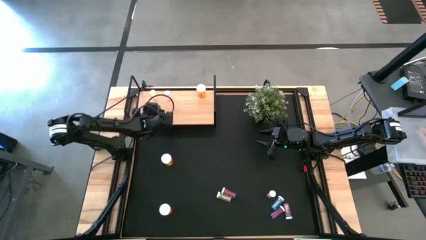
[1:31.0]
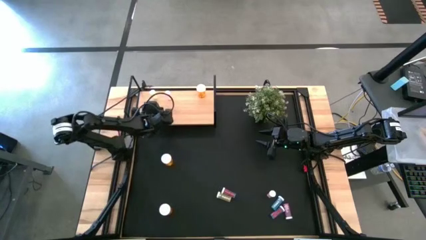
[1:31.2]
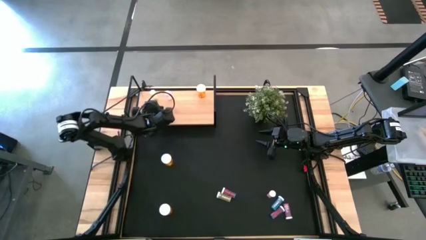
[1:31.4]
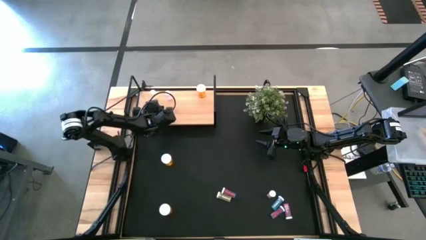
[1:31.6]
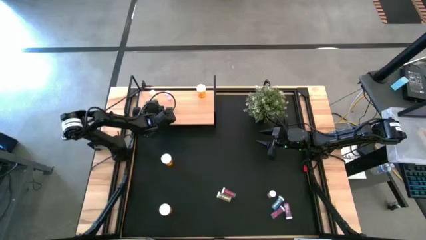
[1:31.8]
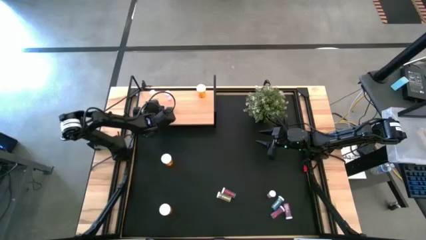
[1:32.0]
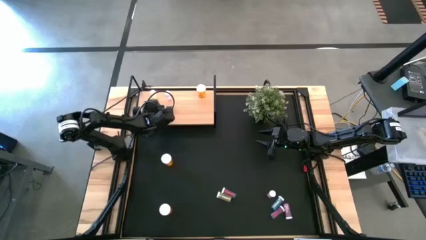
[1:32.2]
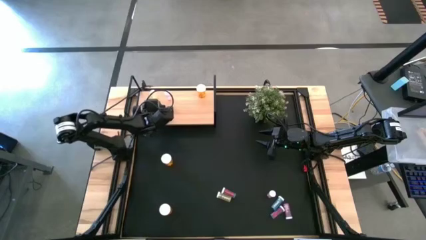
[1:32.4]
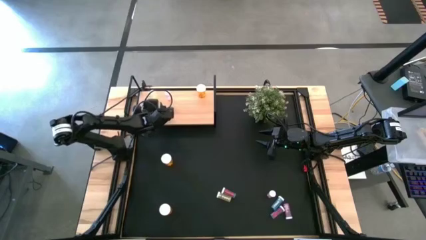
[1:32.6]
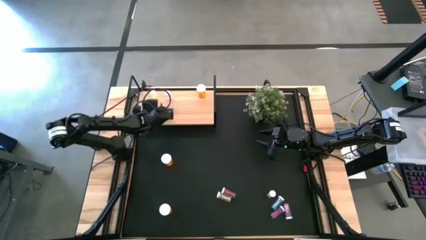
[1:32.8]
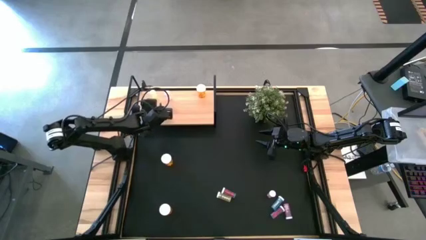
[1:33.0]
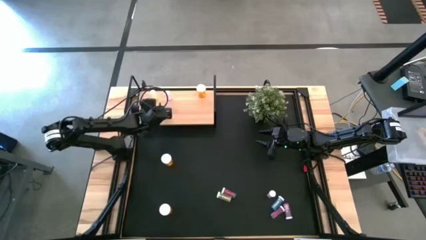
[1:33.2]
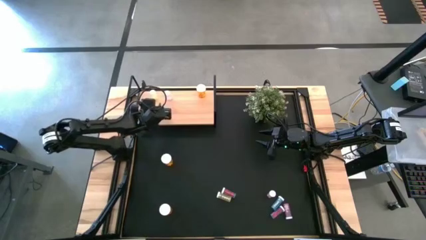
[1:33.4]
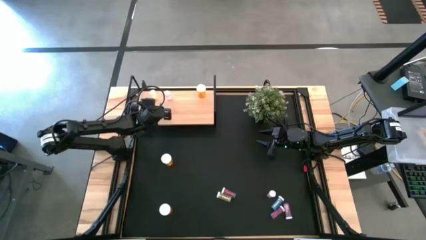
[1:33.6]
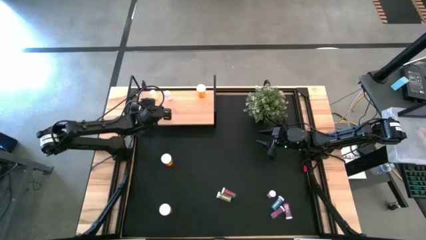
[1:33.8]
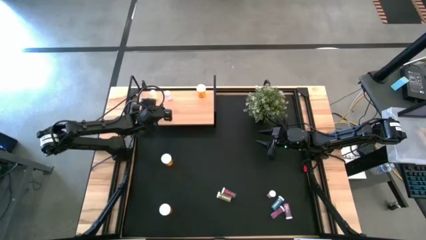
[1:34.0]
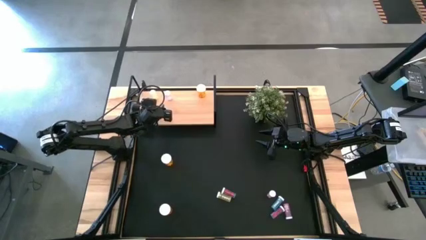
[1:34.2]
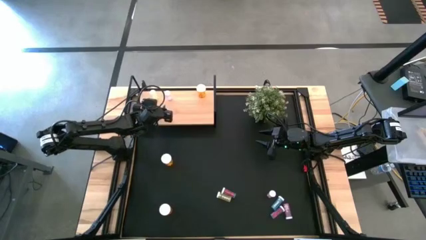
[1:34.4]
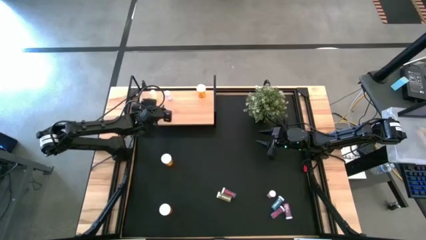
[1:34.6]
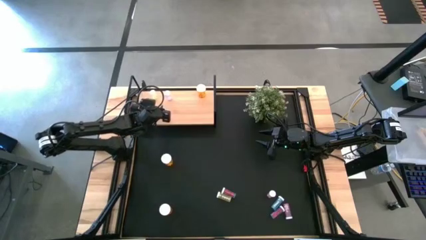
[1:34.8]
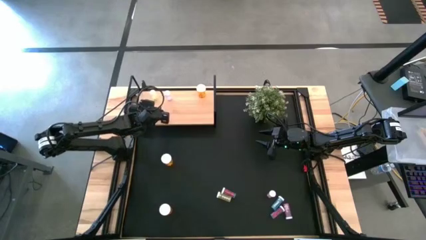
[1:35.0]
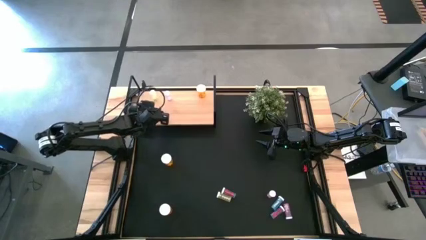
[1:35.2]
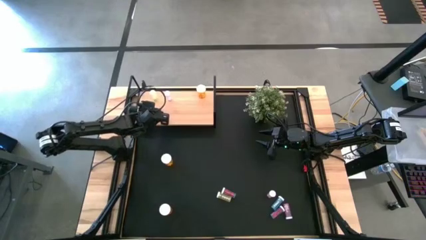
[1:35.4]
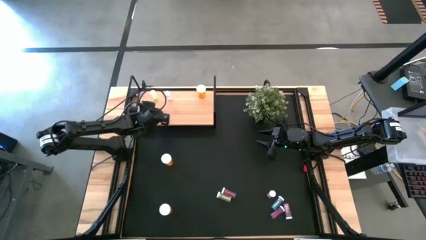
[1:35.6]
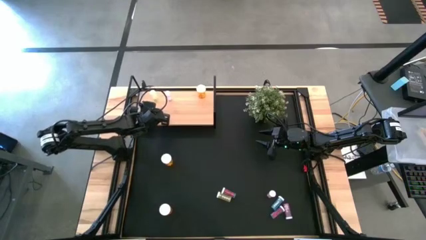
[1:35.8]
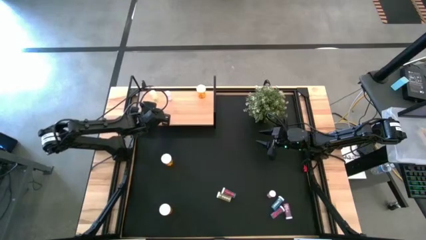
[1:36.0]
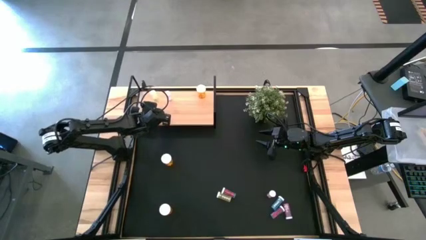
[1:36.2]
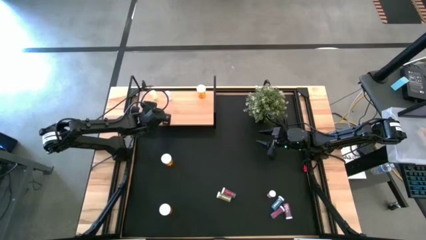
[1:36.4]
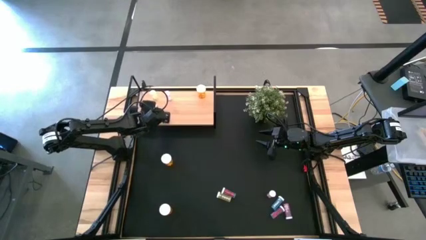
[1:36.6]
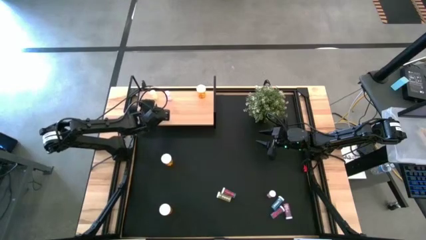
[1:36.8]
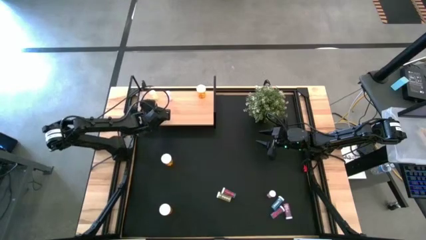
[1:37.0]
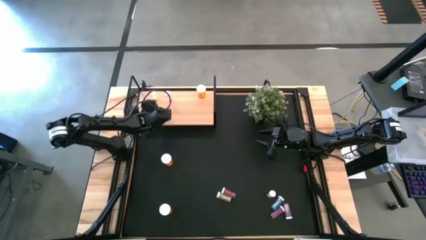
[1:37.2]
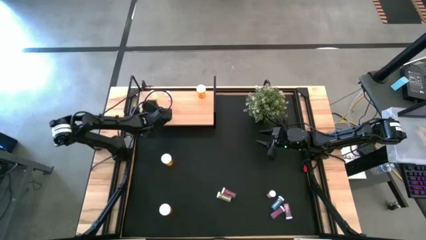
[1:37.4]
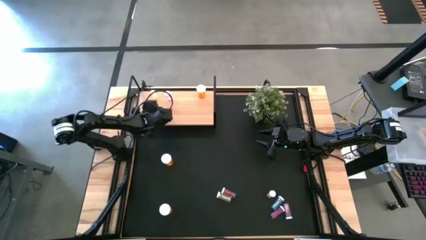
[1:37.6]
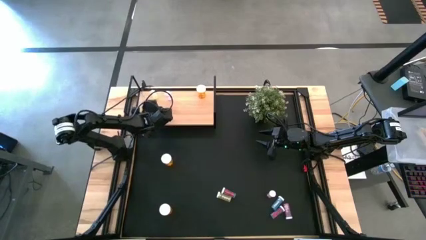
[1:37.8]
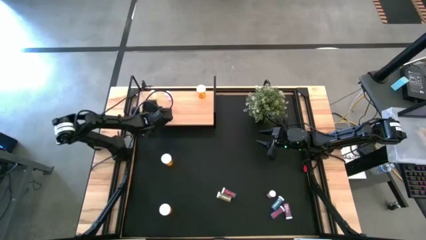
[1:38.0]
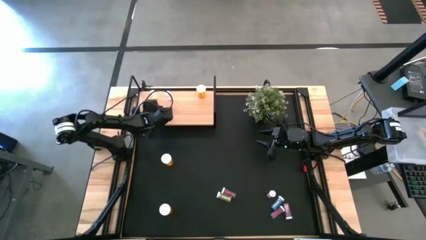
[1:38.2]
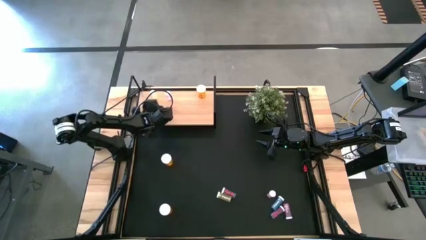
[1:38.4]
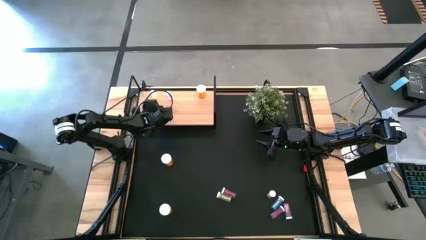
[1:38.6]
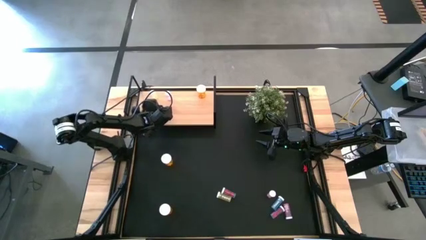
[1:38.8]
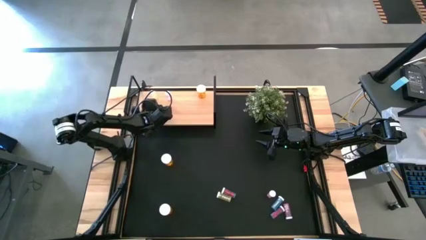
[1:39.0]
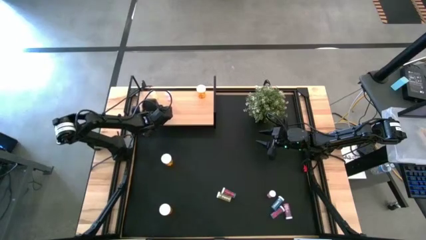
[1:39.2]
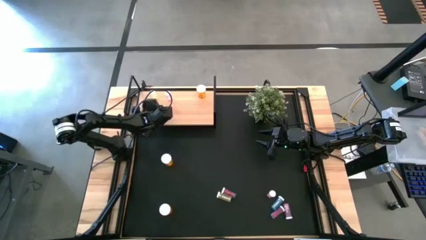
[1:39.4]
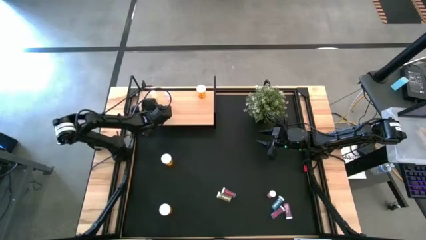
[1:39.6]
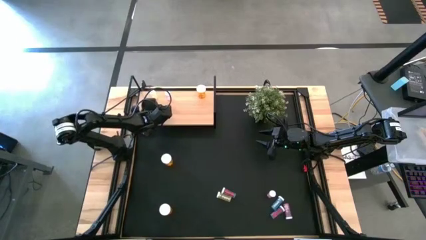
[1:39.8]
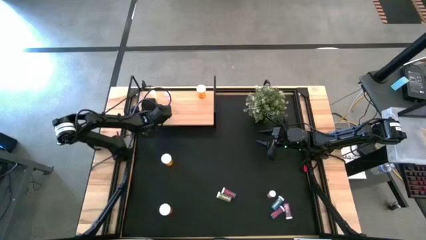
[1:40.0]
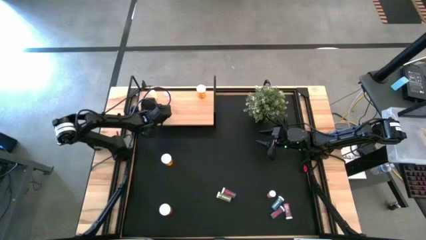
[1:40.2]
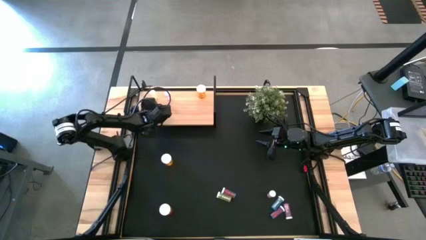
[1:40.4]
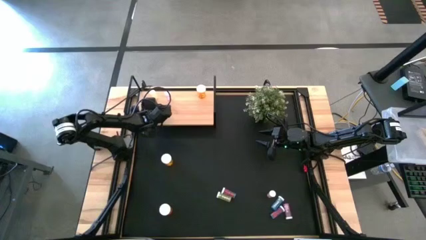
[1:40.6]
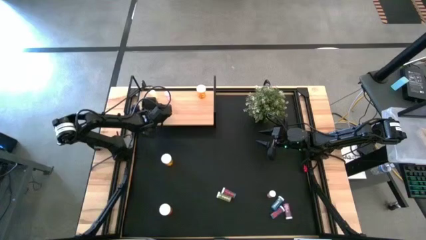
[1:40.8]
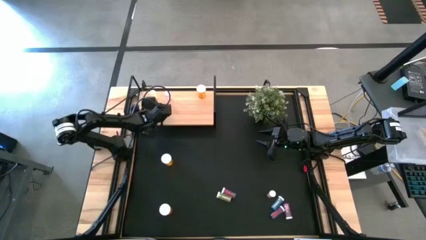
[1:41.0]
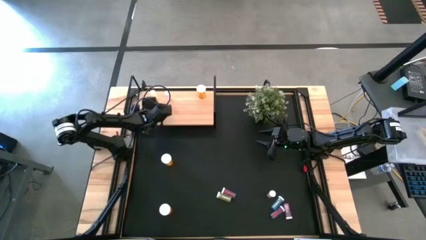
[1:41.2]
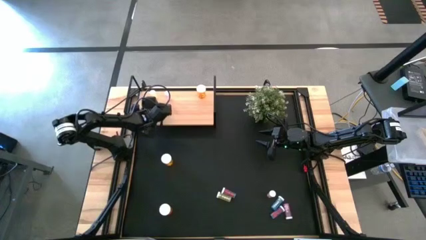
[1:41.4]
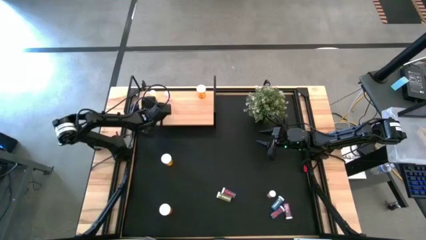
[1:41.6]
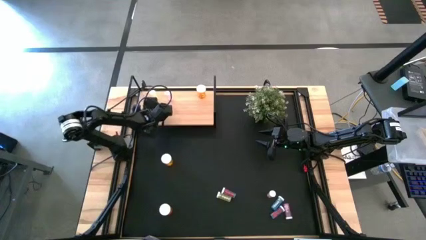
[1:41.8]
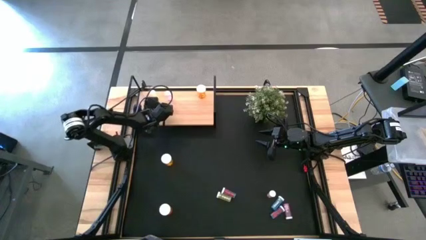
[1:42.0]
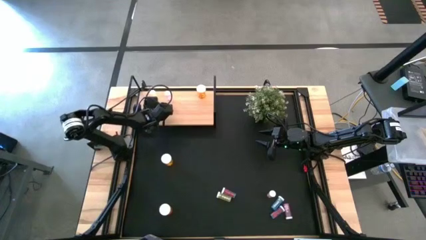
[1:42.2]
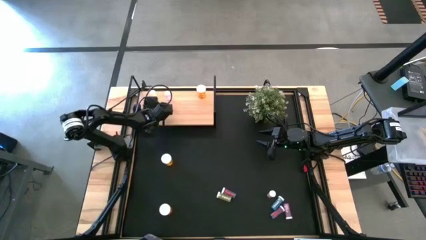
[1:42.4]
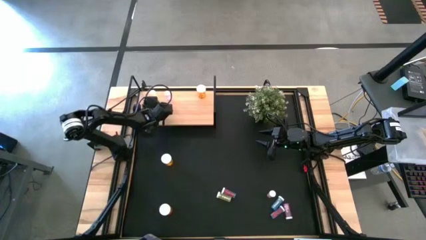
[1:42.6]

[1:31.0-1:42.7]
Task: Pick and place medicine bottles onto shelf by color
Put the bottom yellow medicine bottle on the shelf aligned with the other yellow medicine bottle

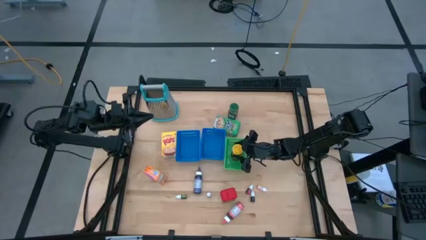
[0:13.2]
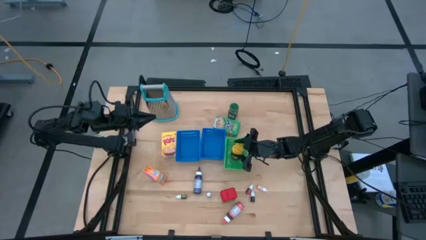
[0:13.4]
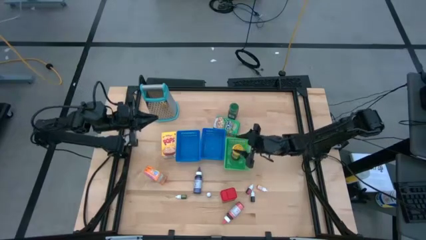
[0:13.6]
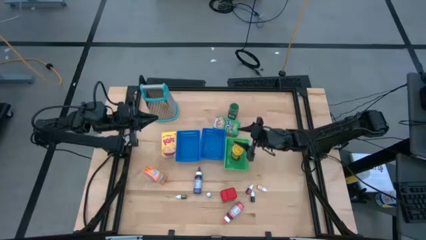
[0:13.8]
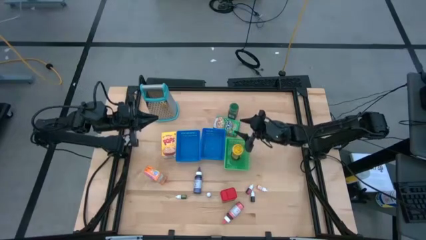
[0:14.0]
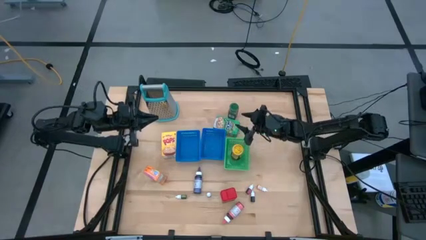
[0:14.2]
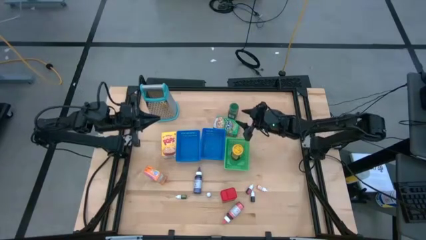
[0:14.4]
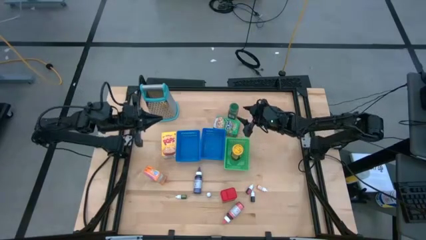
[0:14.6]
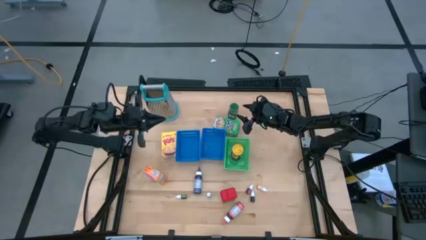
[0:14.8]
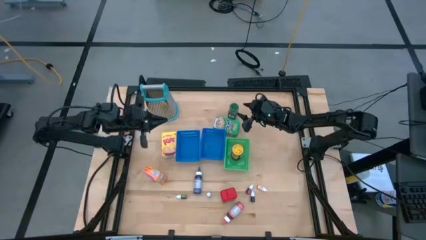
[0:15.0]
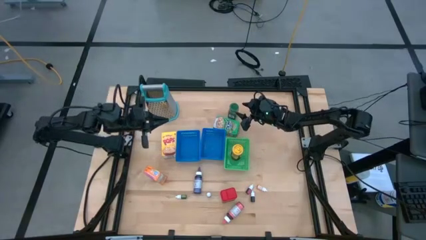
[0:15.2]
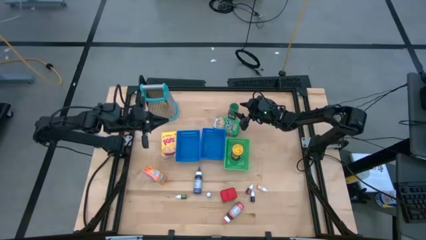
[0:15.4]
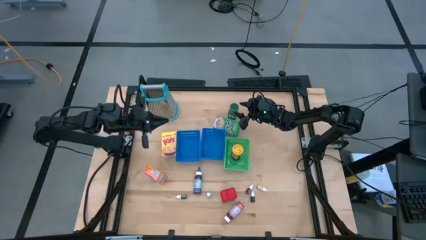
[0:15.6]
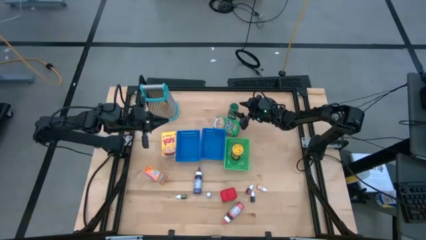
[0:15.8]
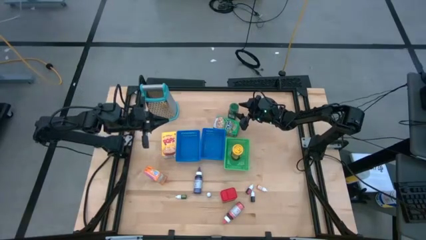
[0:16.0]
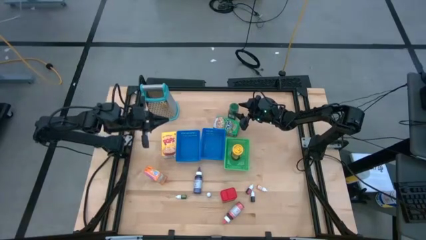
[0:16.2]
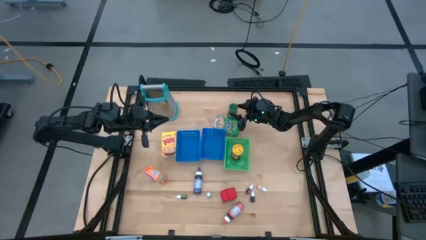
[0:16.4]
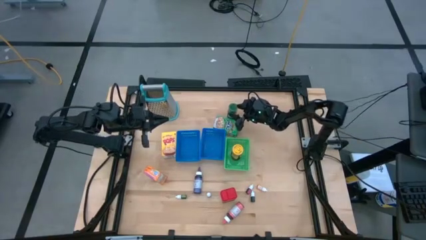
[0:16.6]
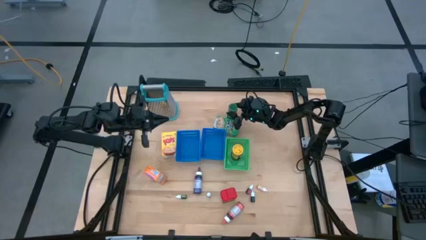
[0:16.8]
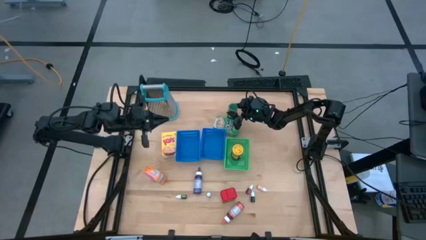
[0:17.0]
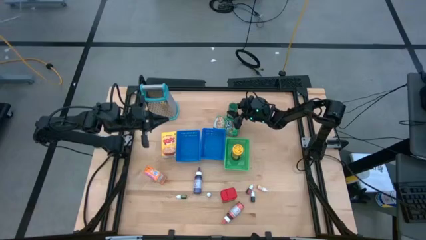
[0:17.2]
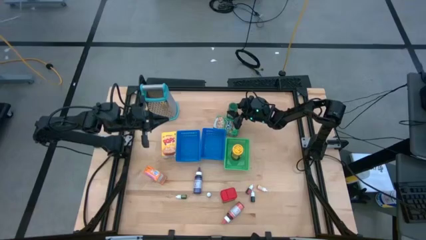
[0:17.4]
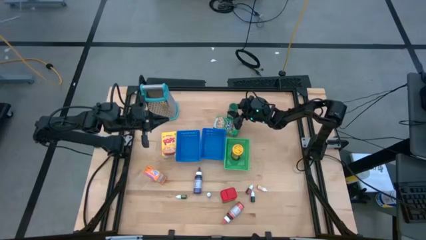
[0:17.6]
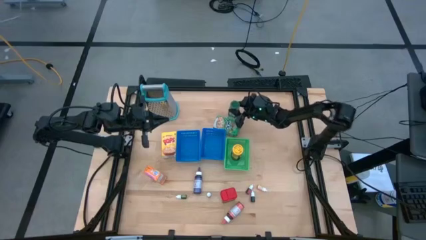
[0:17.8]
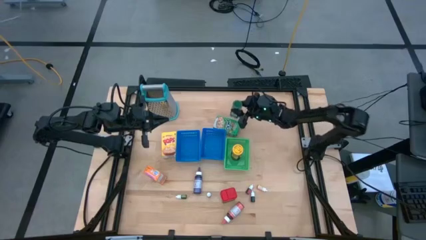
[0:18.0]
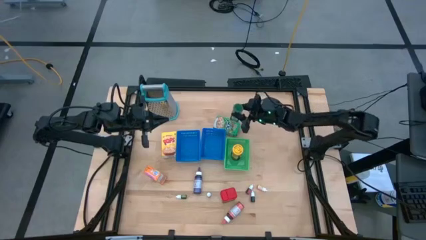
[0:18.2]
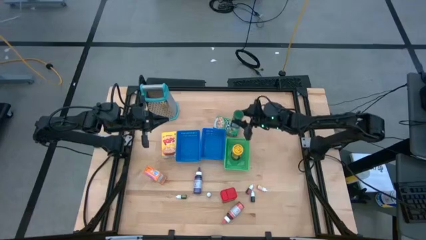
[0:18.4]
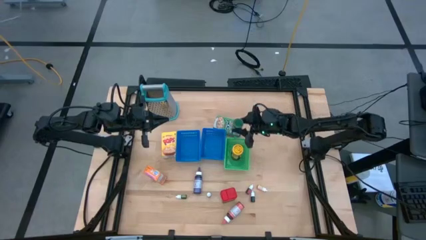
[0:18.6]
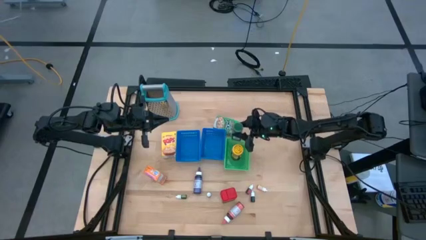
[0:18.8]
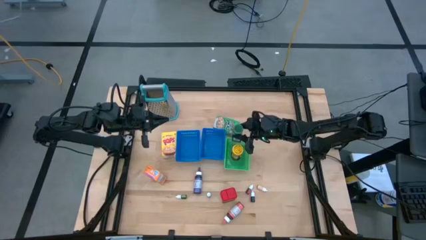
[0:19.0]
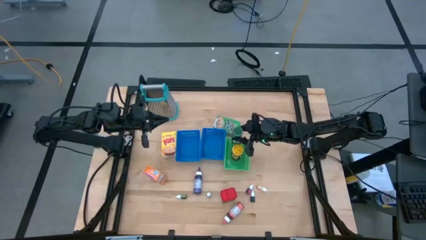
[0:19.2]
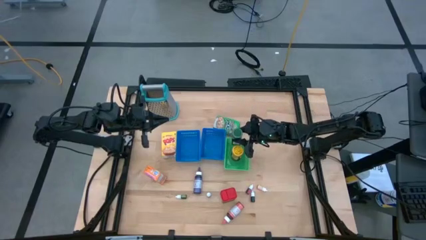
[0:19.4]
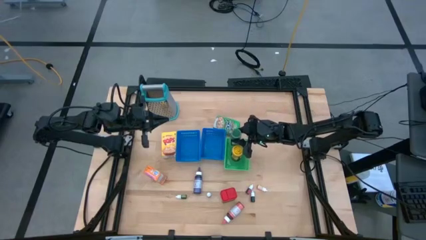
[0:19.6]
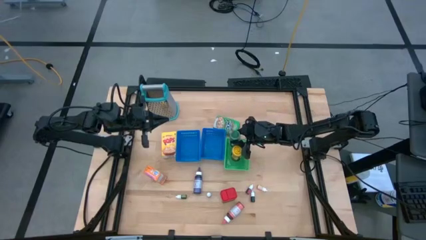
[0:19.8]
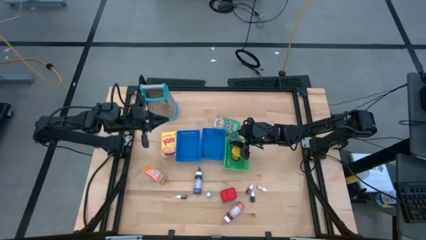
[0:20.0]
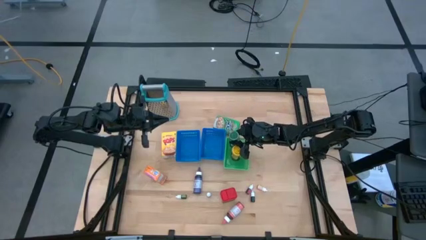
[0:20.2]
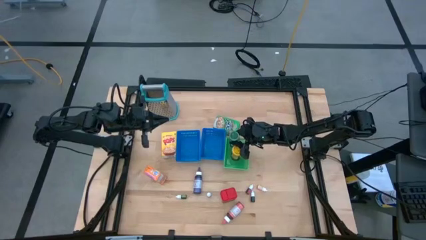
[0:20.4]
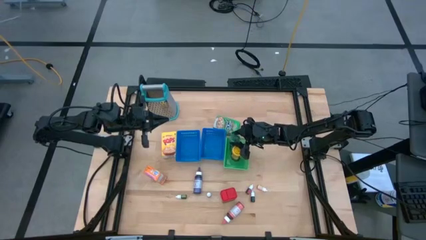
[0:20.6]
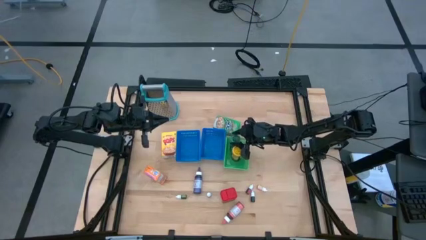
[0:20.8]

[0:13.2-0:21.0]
Task: Pick & Place Kitchen Items
Put the green seasoning bottle into the green bin
